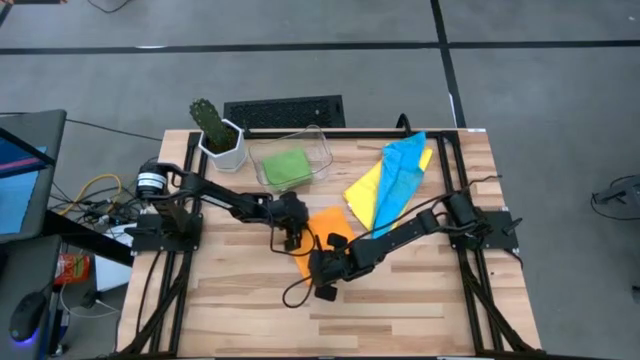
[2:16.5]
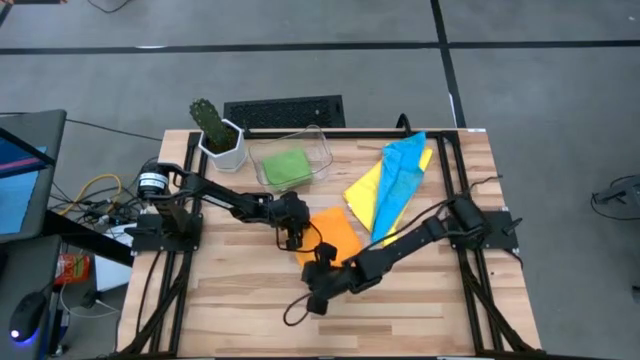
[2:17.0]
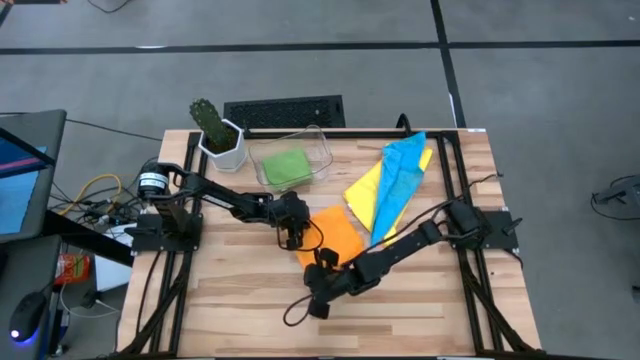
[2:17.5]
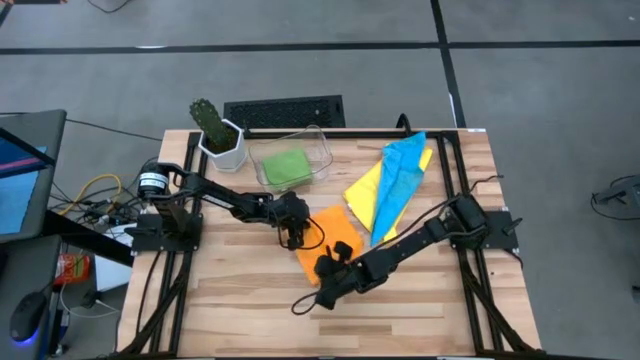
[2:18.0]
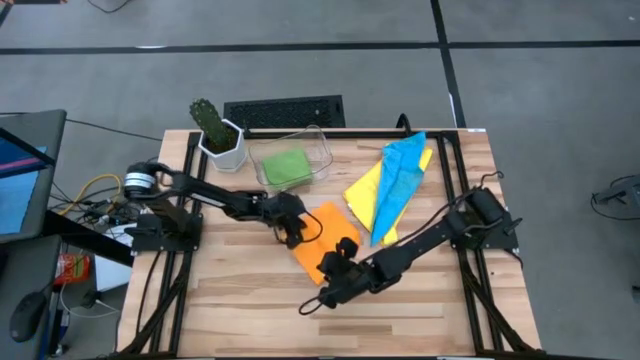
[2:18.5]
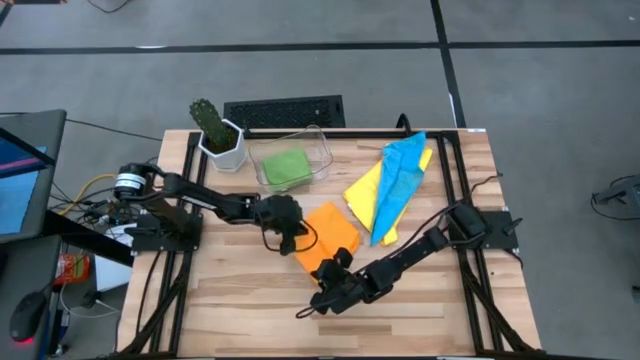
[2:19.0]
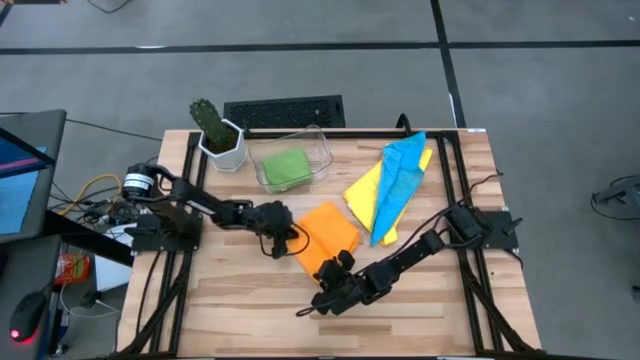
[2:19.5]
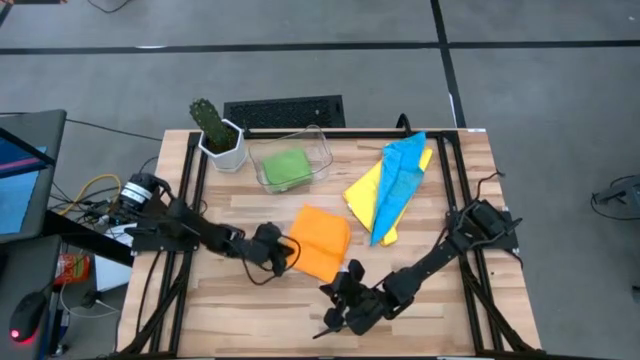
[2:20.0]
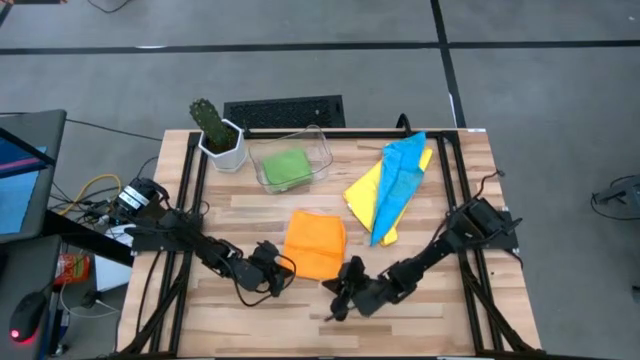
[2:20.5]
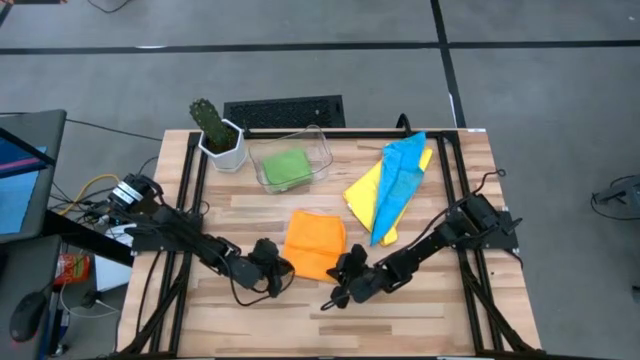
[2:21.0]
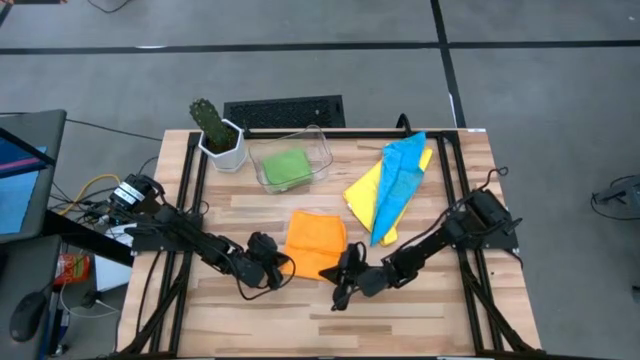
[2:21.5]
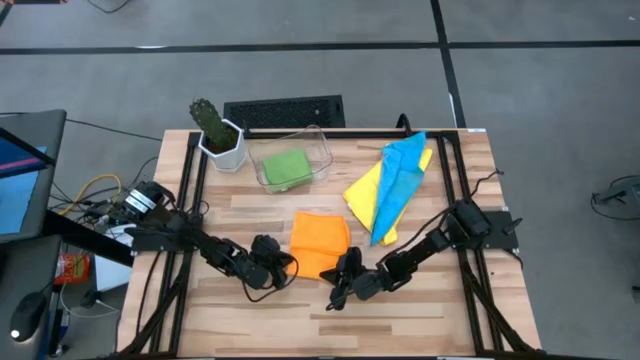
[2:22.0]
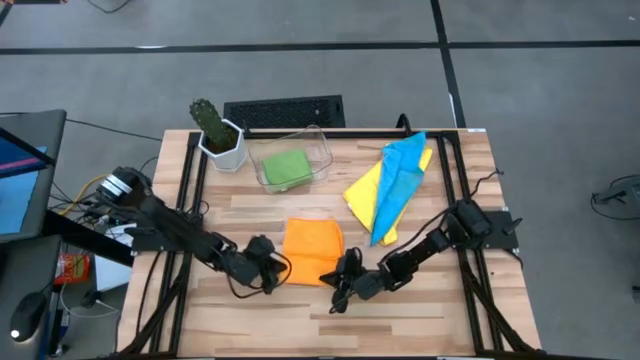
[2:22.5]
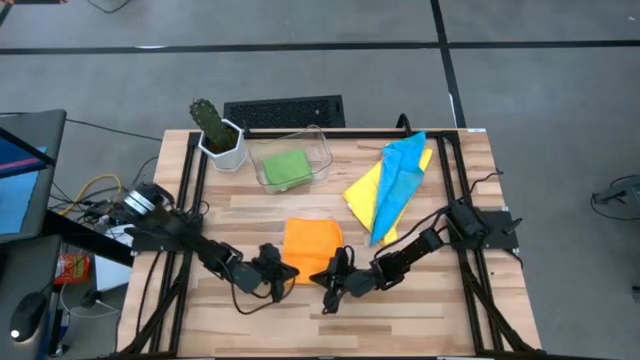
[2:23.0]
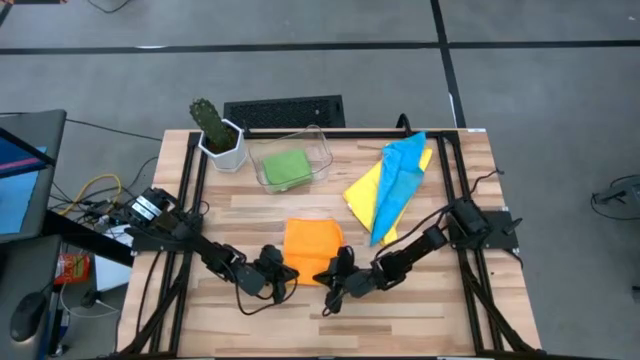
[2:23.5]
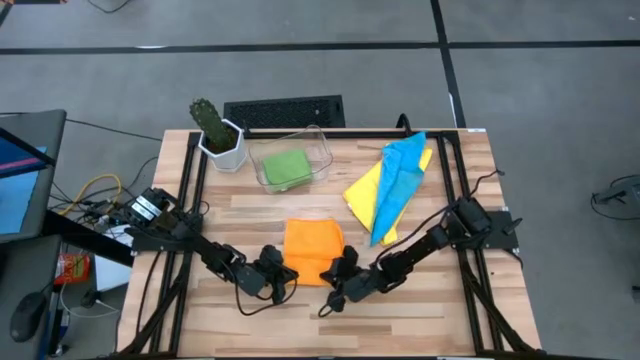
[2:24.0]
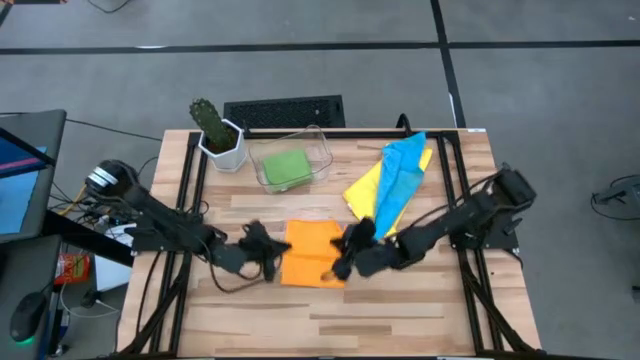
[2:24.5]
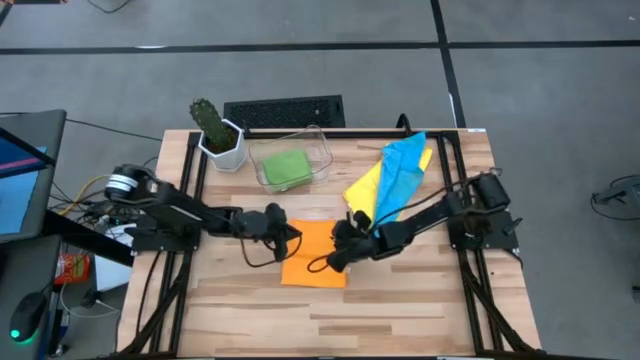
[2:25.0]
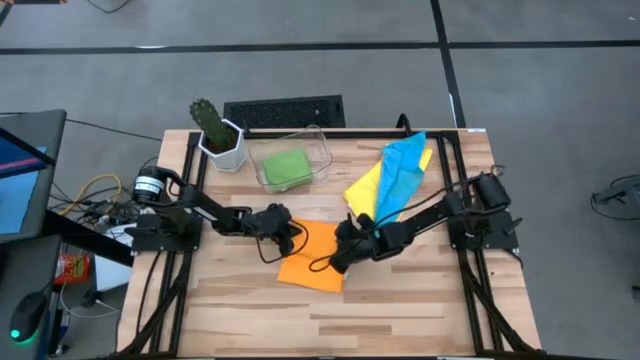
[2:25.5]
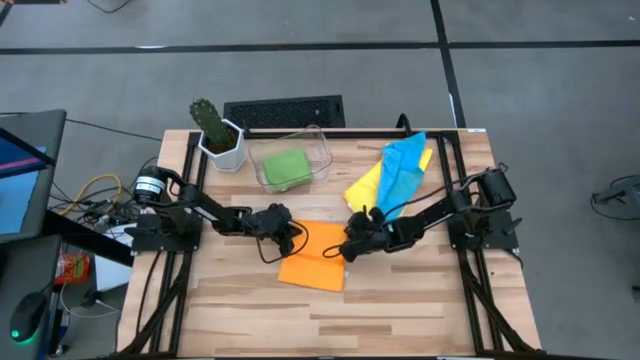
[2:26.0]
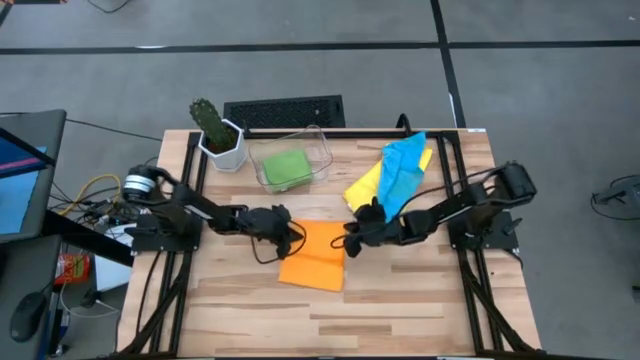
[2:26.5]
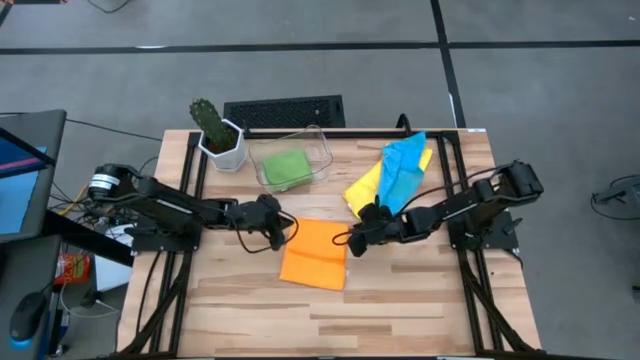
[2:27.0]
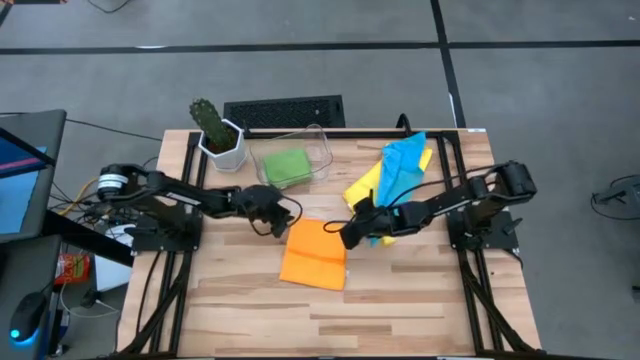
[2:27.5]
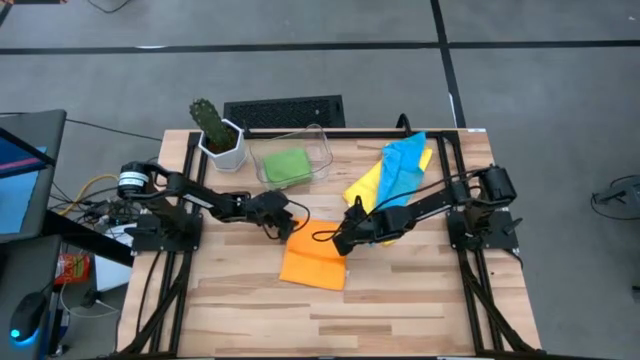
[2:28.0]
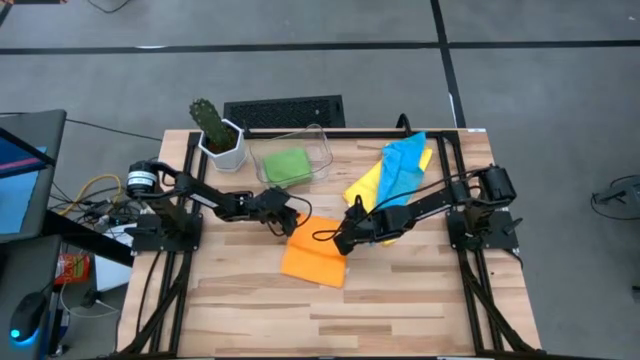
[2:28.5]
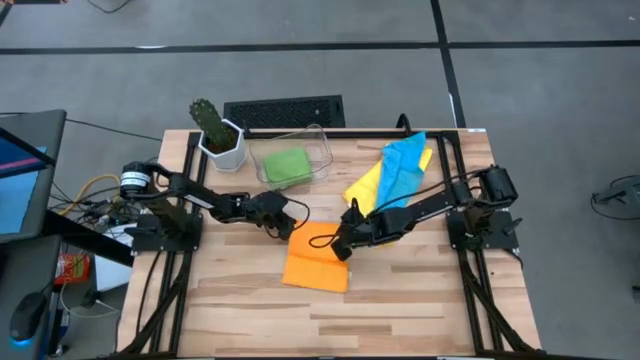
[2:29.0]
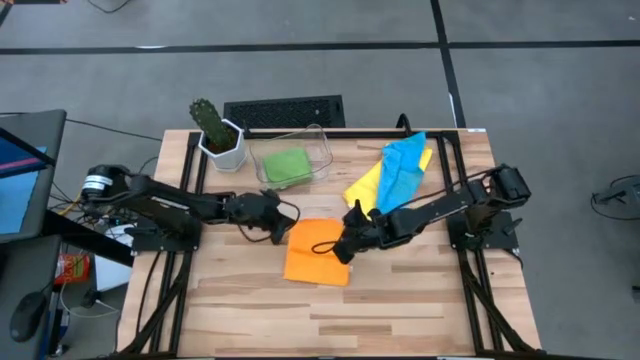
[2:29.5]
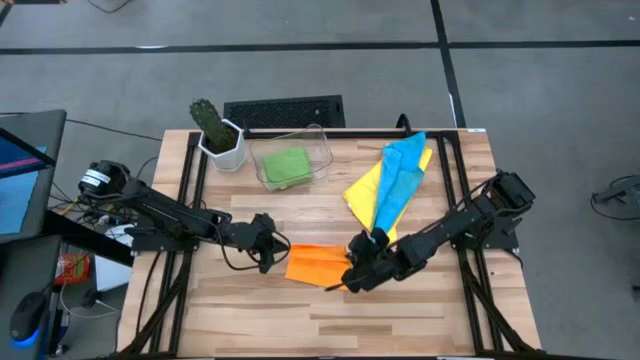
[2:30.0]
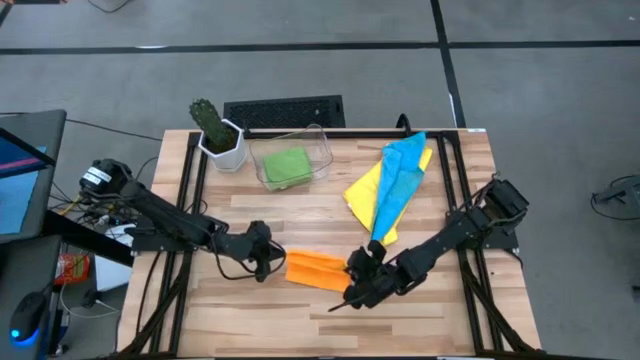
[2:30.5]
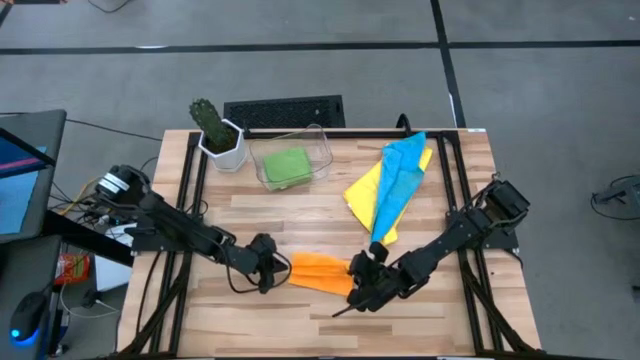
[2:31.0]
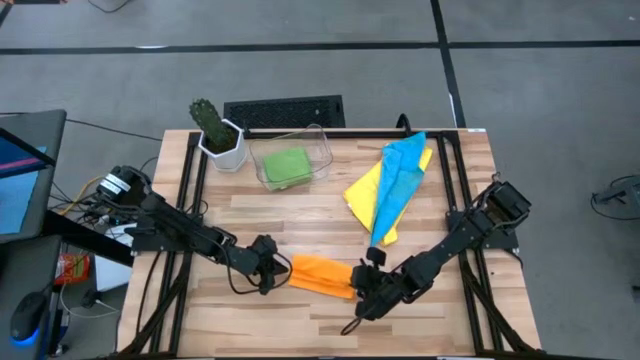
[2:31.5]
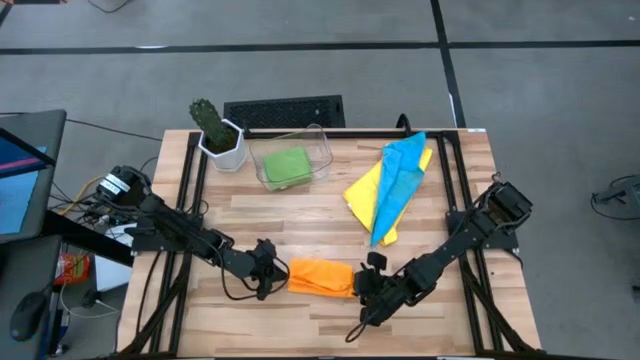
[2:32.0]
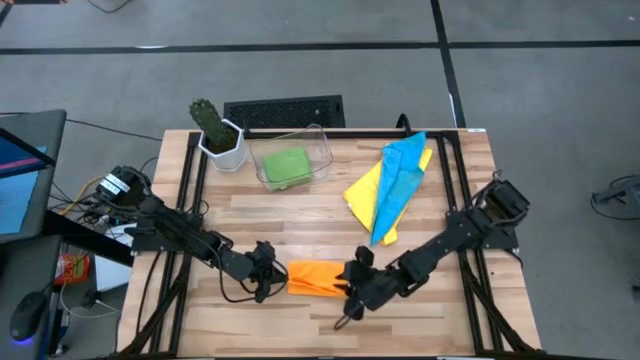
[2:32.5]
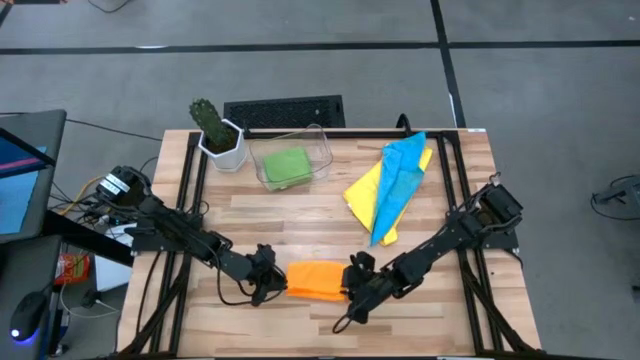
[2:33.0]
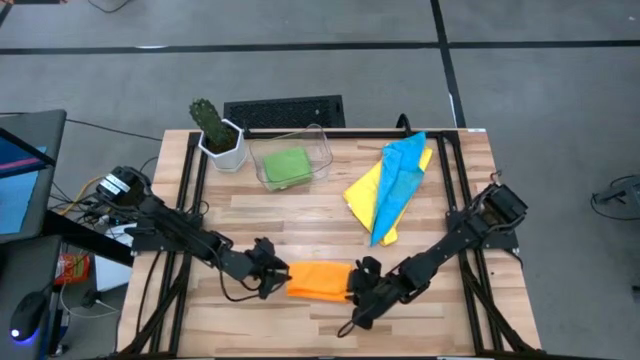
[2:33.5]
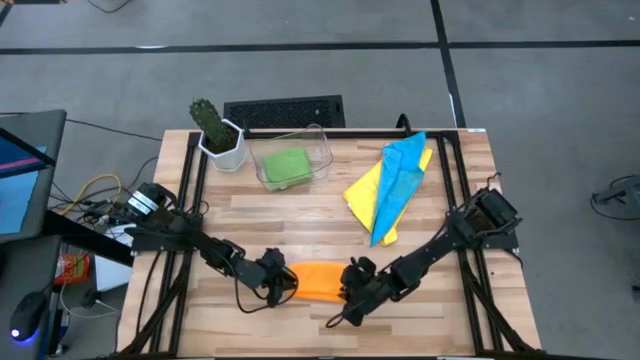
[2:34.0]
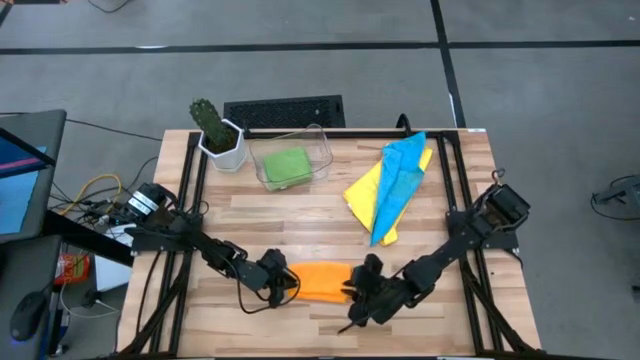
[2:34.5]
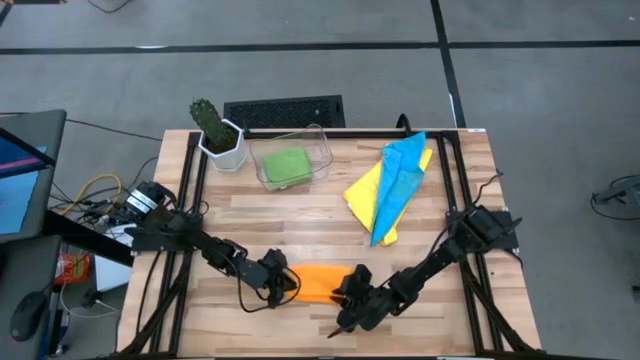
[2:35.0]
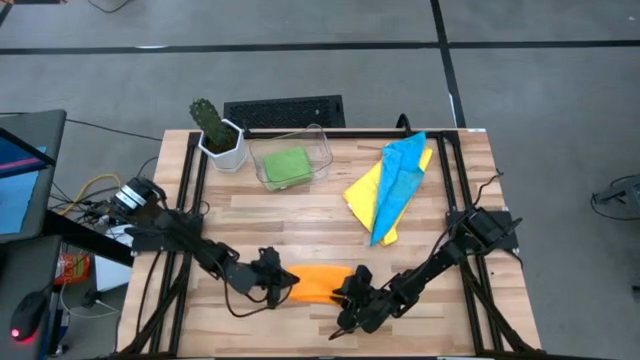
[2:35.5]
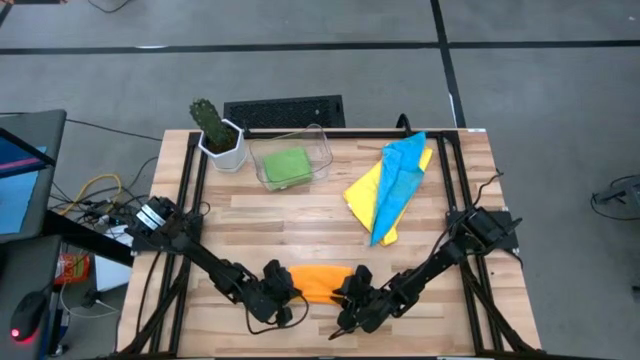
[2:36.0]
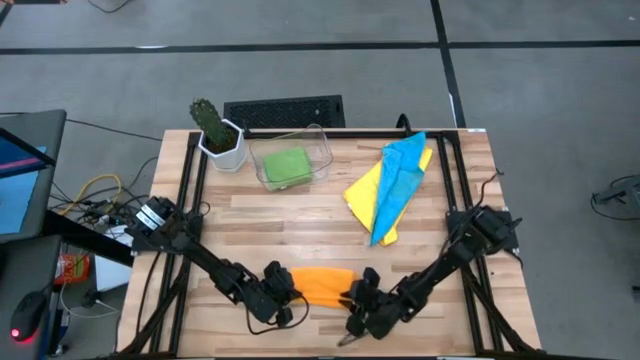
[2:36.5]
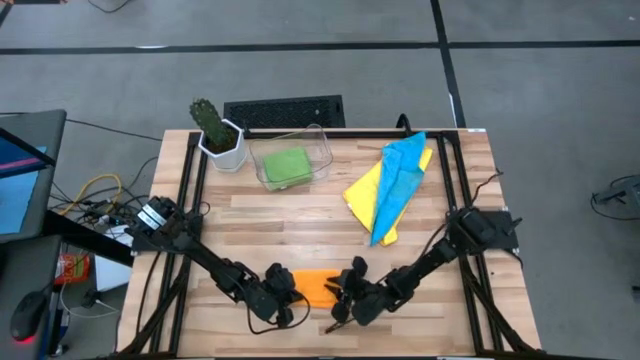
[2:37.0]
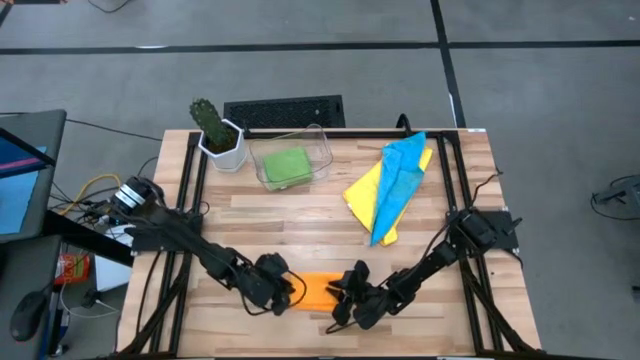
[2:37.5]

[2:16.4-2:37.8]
Task: Fold microfiber towels
Fold the orange microfiber cloth
